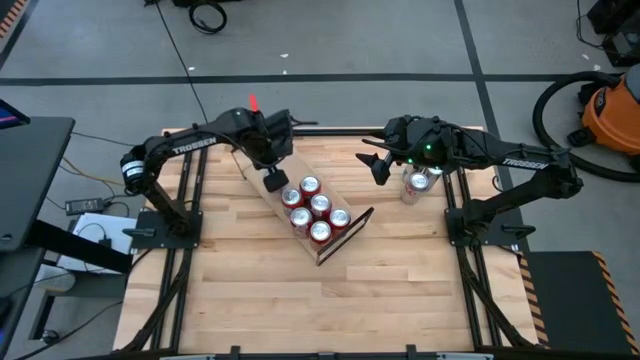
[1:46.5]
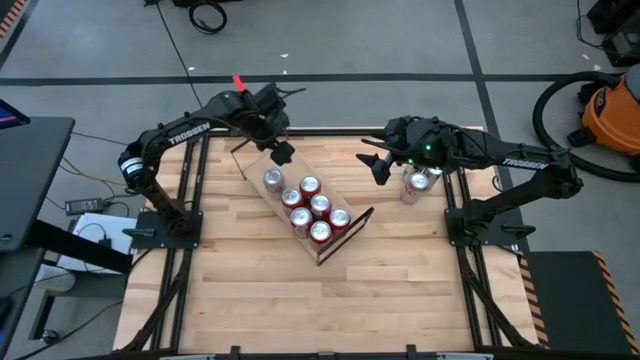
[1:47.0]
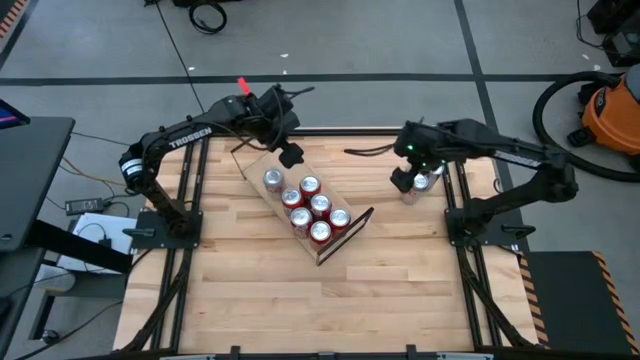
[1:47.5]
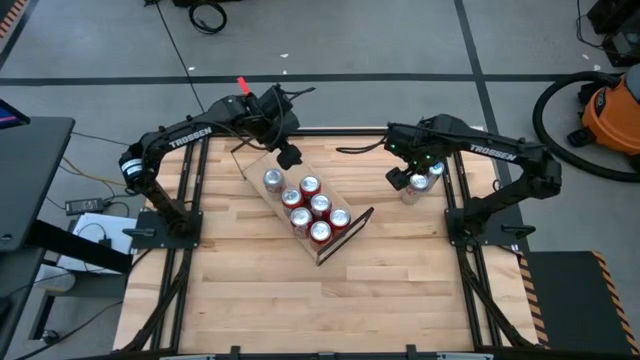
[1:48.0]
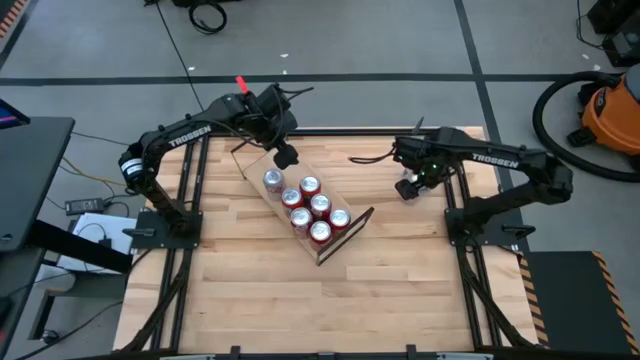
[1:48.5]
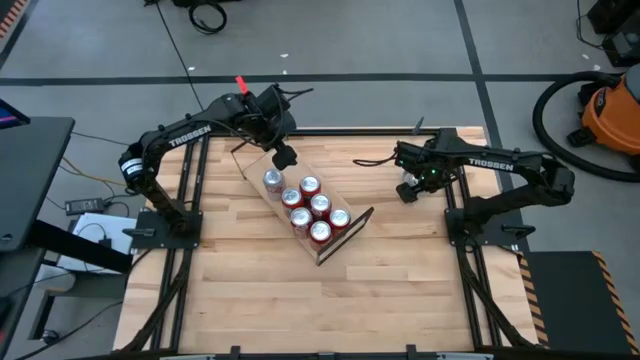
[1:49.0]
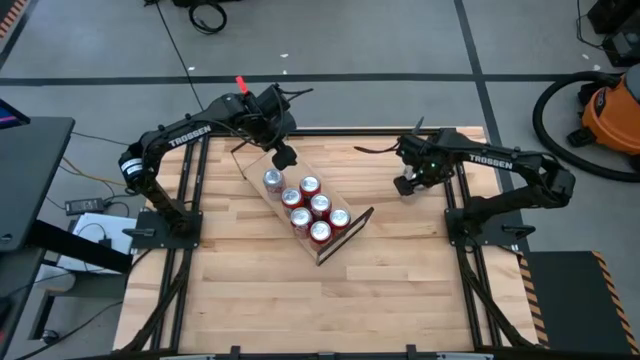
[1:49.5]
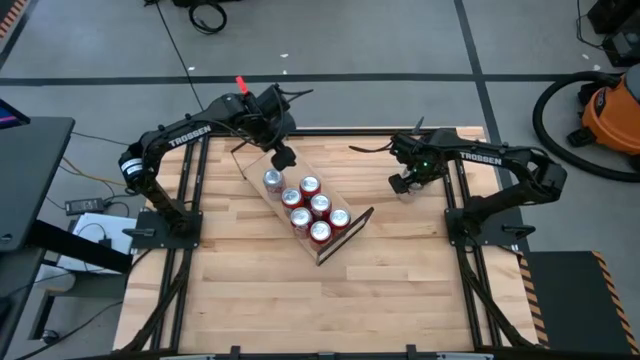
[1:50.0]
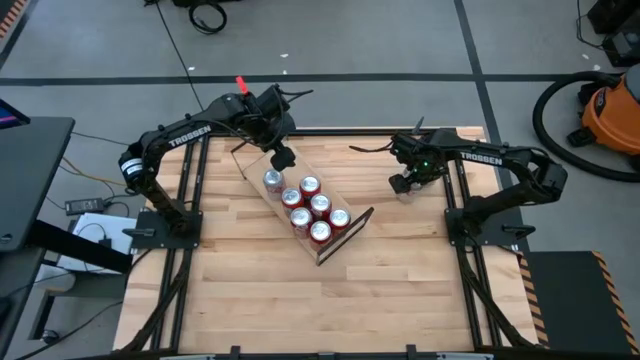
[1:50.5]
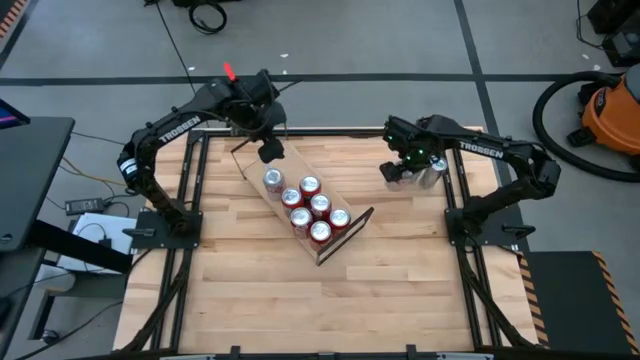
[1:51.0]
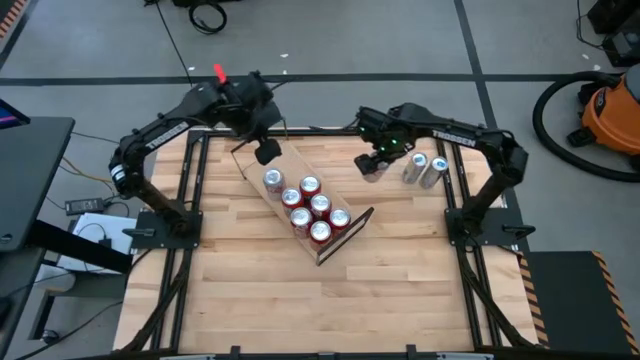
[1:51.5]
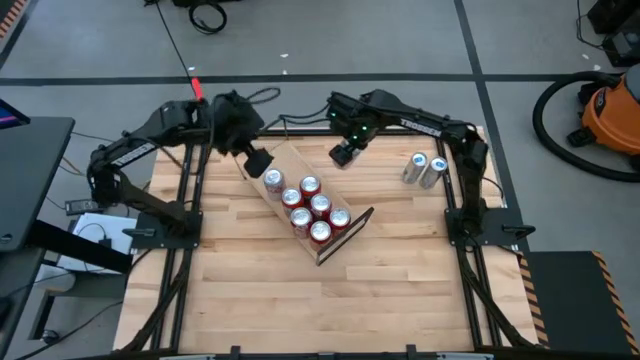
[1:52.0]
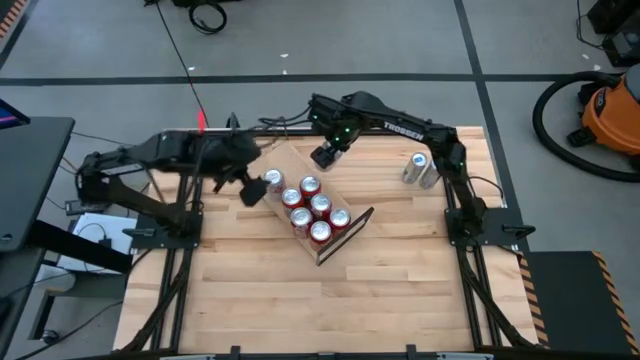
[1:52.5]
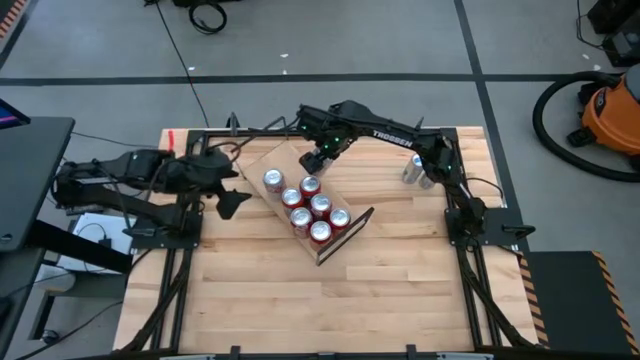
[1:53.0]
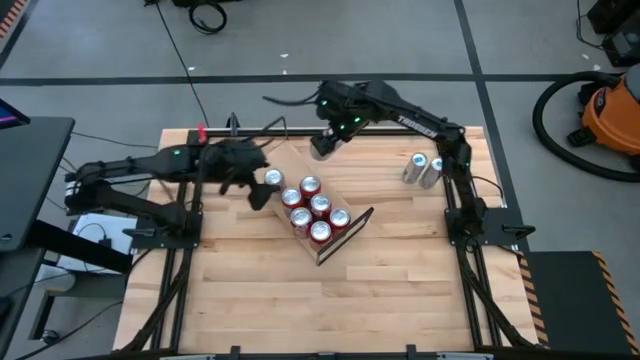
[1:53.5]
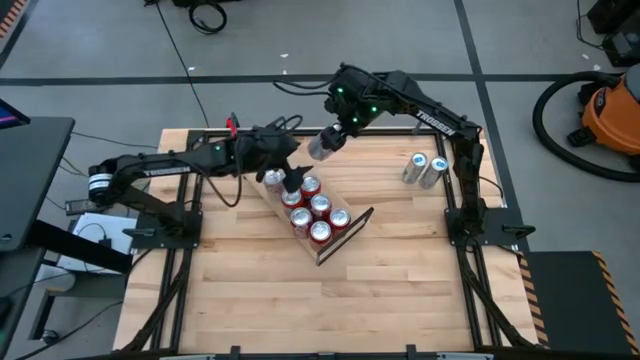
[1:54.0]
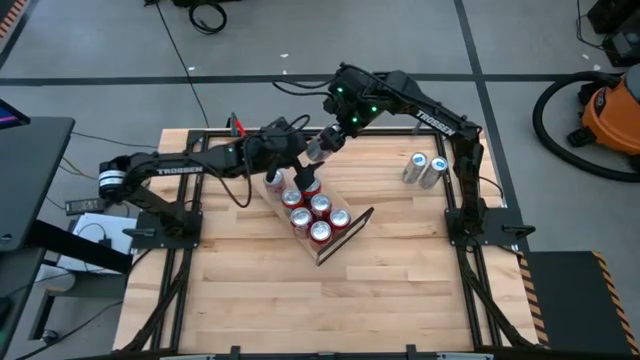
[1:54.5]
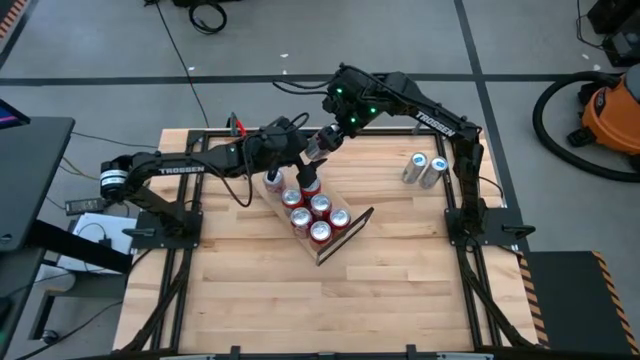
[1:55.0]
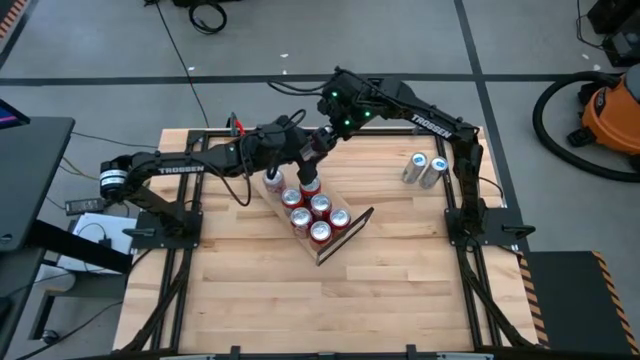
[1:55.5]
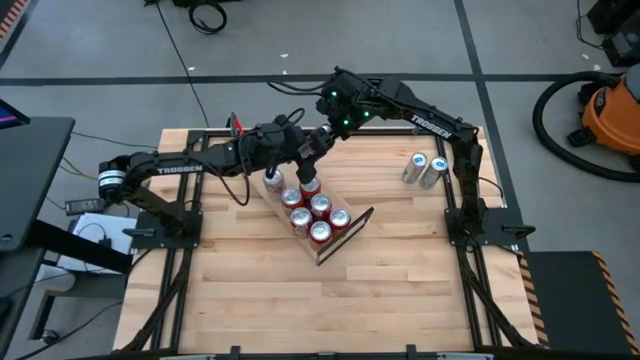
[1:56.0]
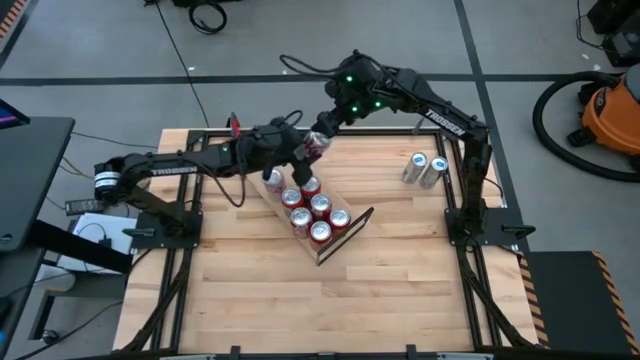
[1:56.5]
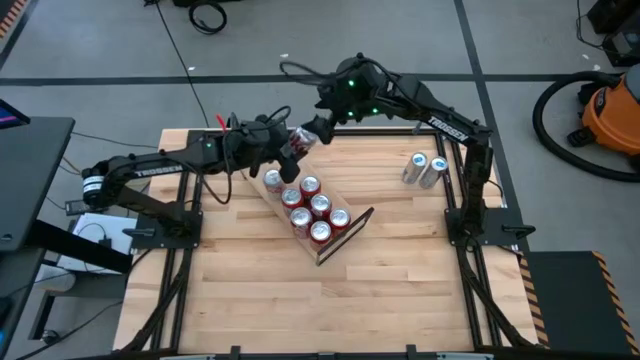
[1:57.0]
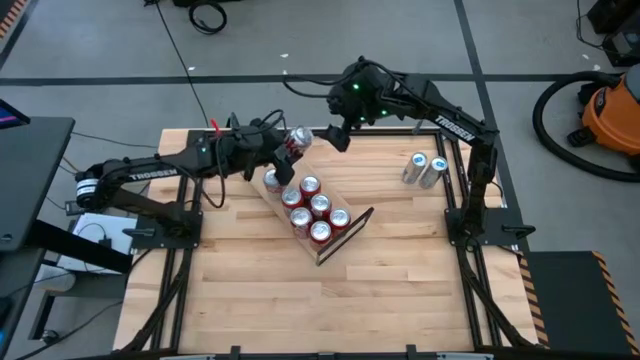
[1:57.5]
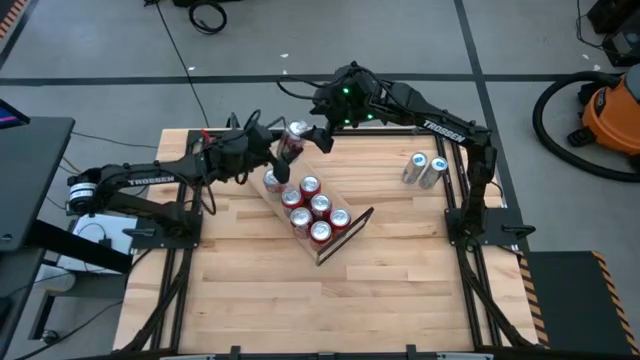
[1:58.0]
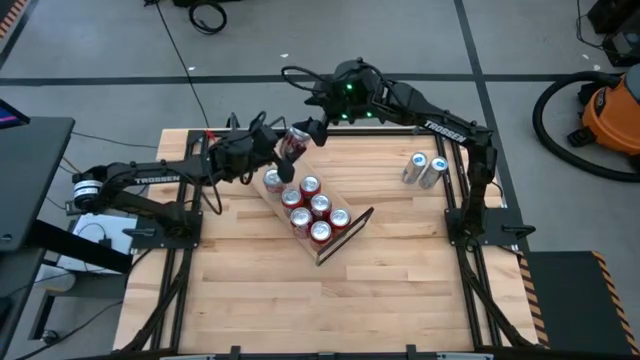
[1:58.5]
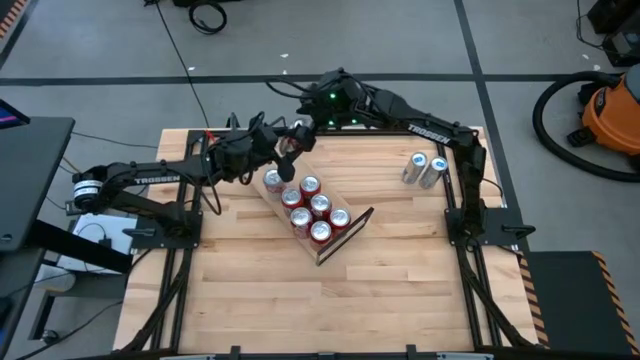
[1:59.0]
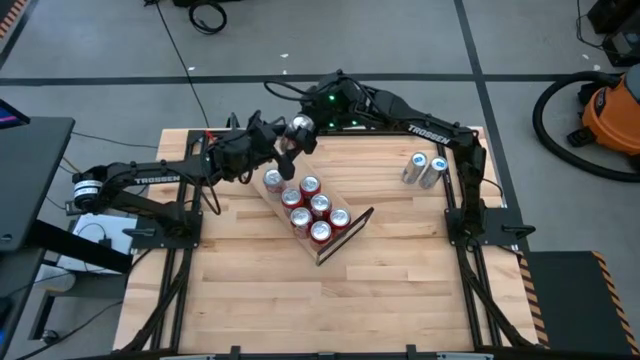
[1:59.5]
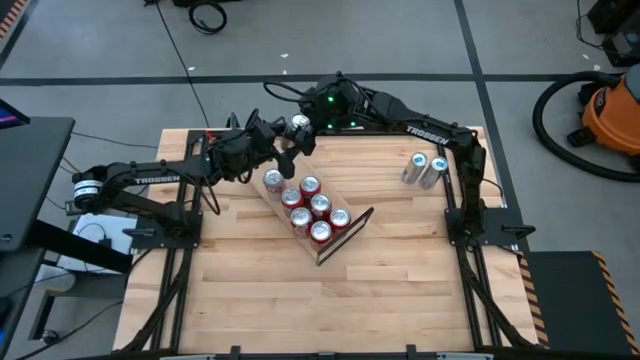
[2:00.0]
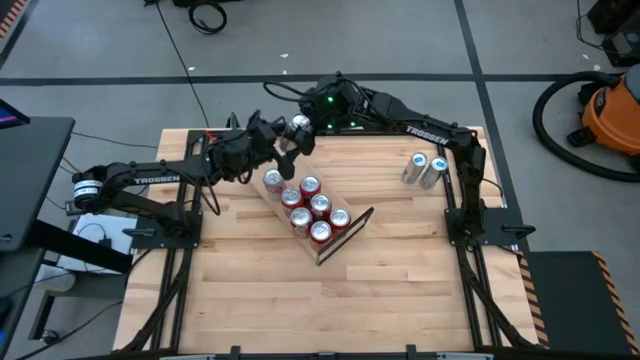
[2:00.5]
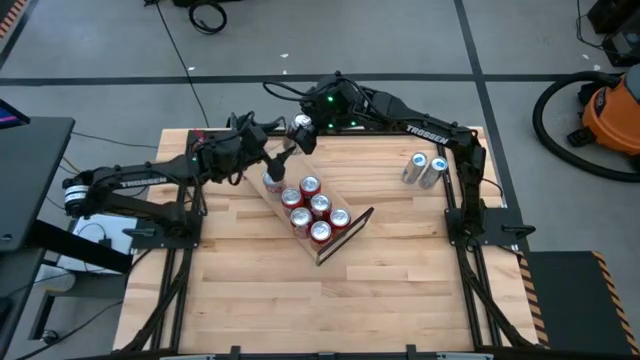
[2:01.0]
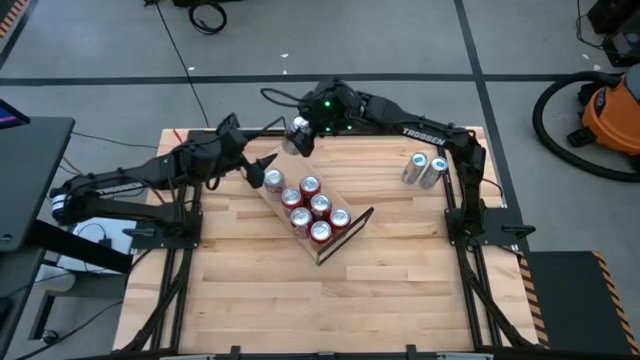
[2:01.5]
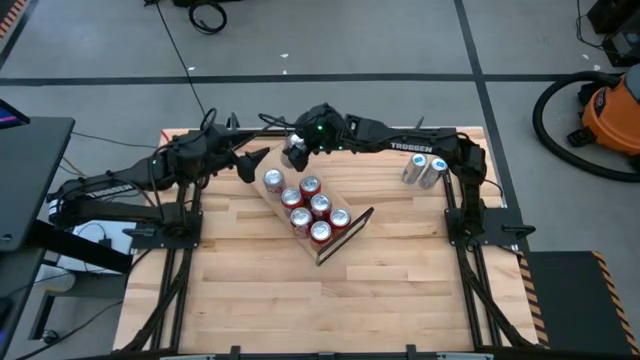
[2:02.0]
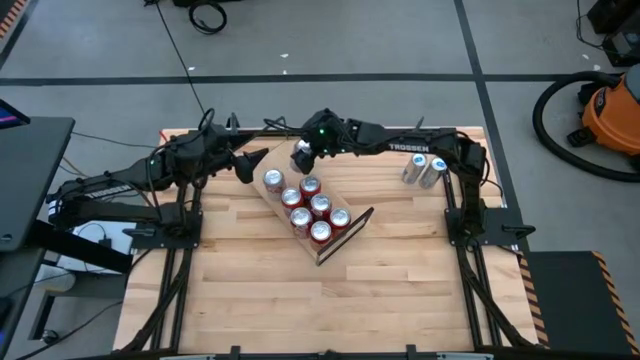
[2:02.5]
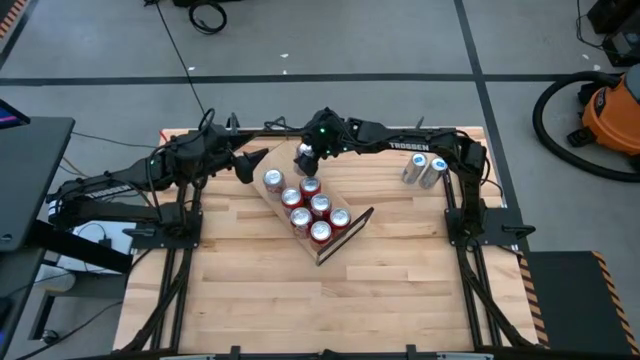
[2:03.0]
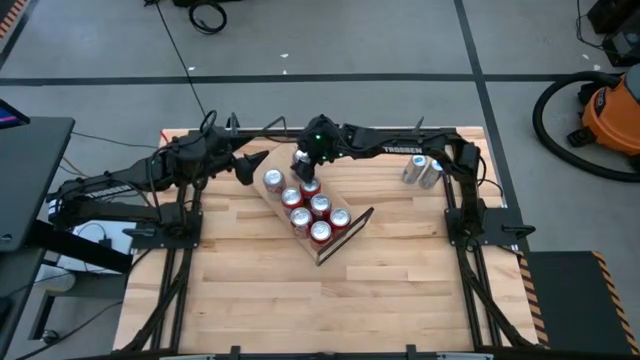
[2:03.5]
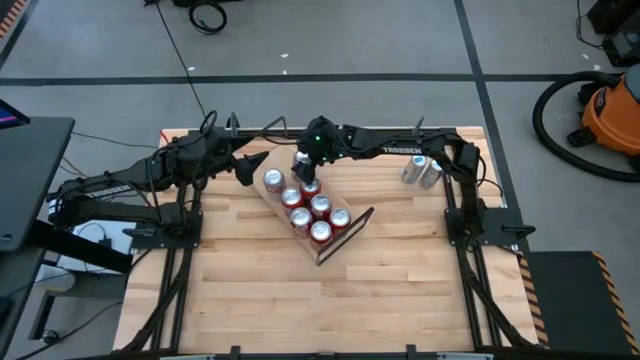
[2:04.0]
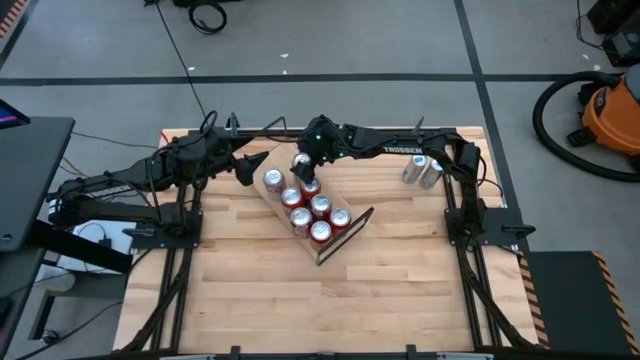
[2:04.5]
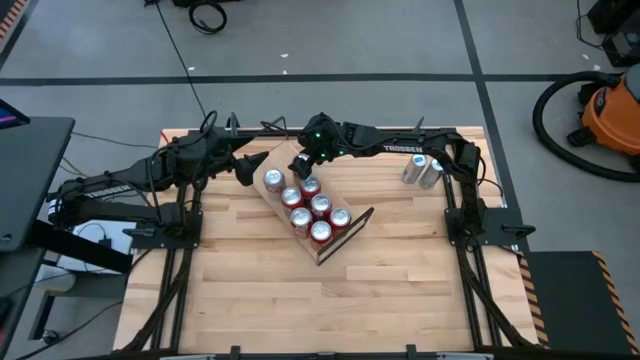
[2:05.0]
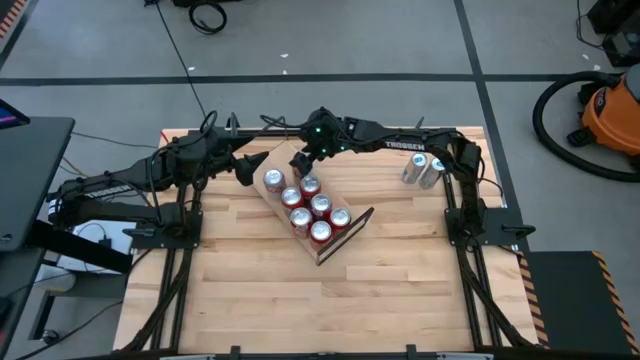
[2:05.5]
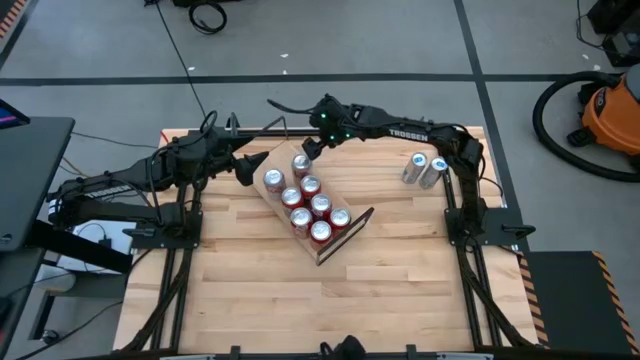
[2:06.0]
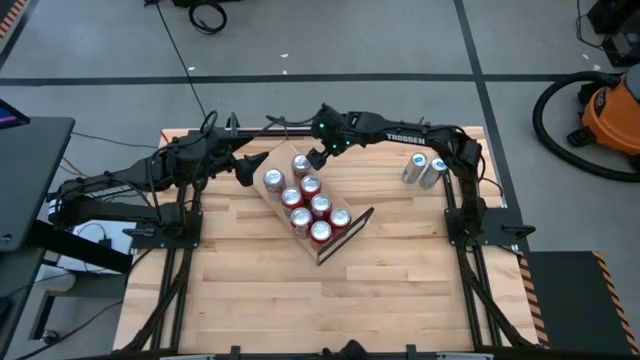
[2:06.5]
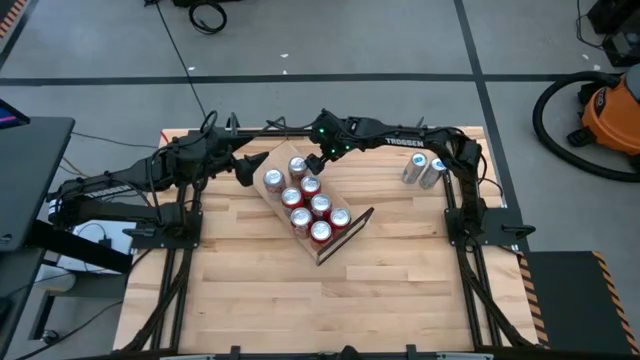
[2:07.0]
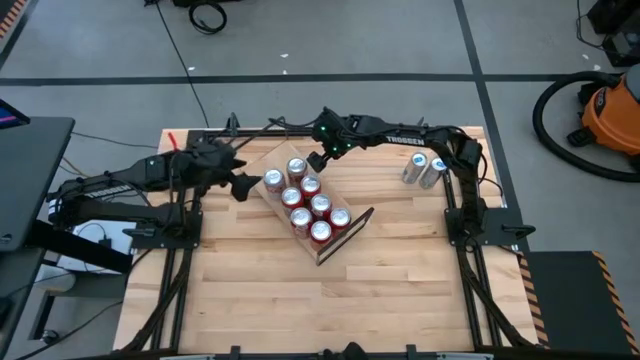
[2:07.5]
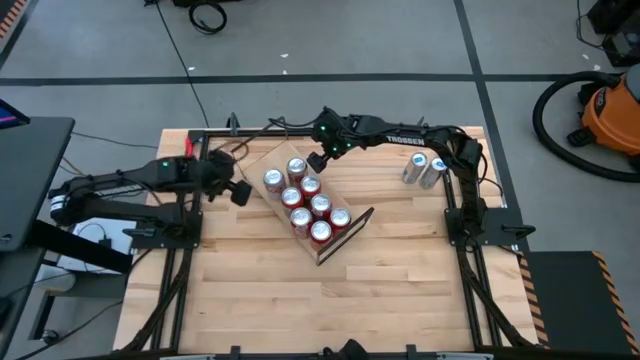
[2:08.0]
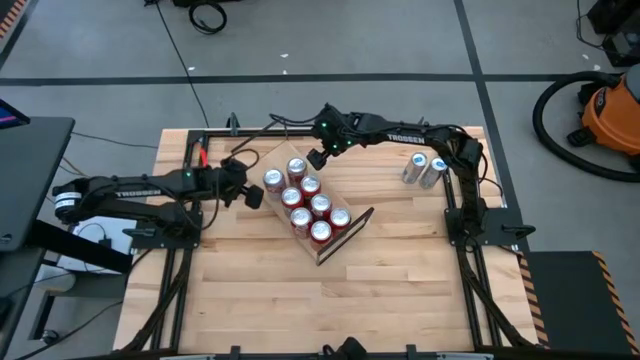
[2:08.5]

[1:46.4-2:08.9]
Task: Place canned beverage on shelf
Put the silver and red soda can on the shelf aligned with the other silver and red soda can
